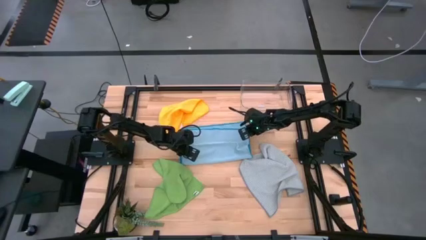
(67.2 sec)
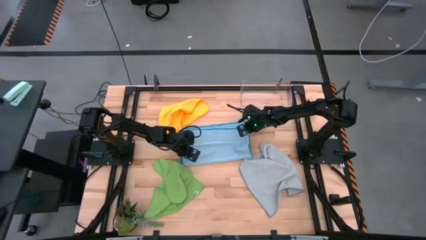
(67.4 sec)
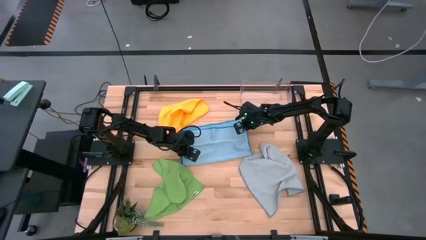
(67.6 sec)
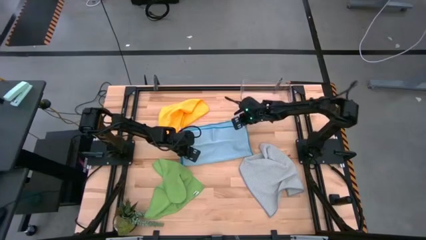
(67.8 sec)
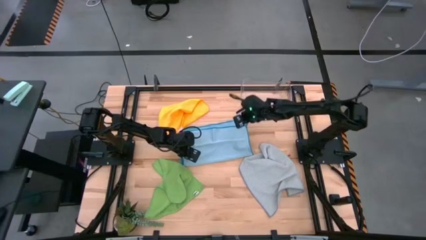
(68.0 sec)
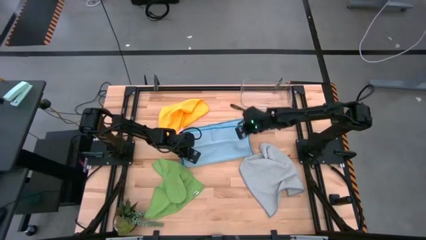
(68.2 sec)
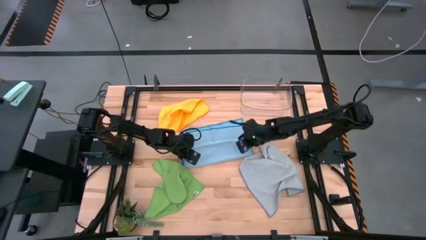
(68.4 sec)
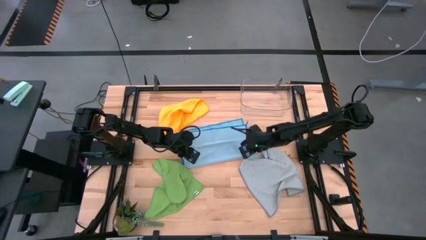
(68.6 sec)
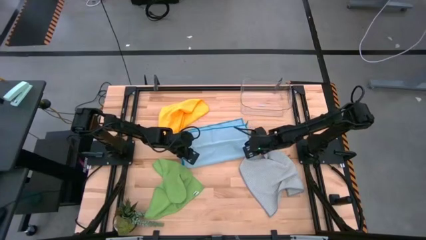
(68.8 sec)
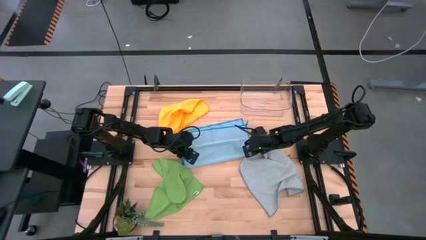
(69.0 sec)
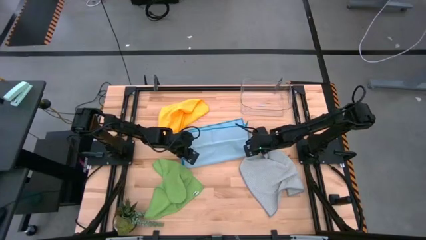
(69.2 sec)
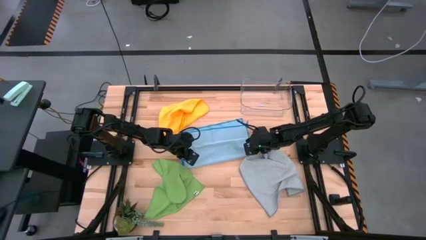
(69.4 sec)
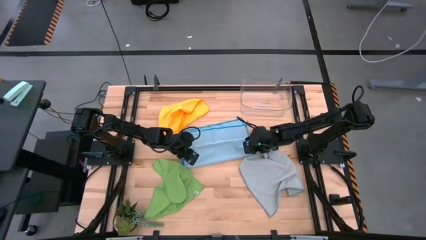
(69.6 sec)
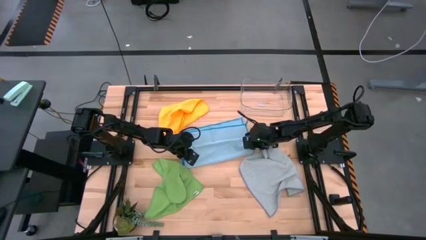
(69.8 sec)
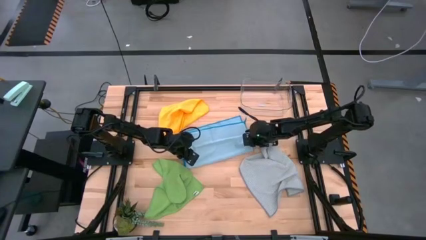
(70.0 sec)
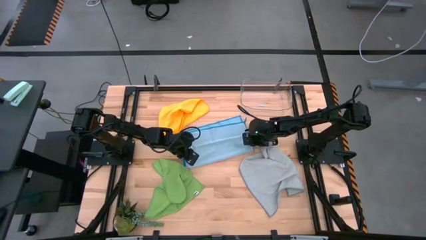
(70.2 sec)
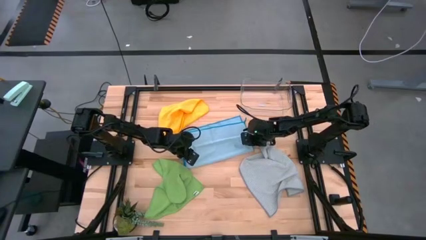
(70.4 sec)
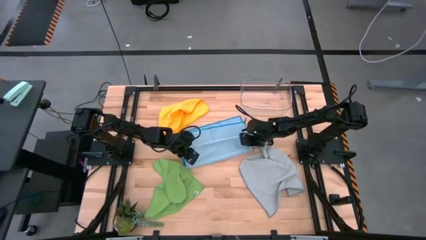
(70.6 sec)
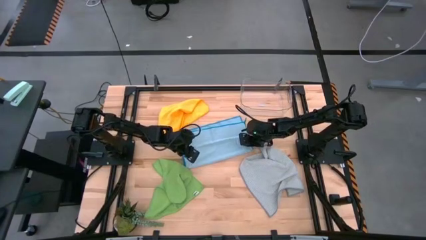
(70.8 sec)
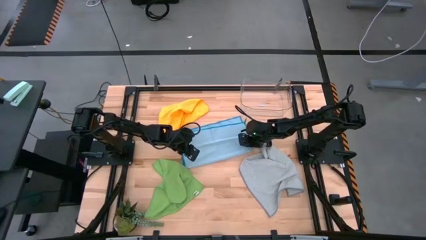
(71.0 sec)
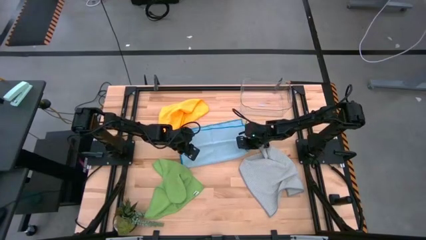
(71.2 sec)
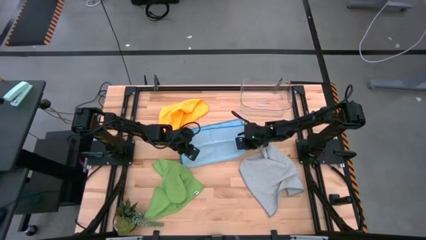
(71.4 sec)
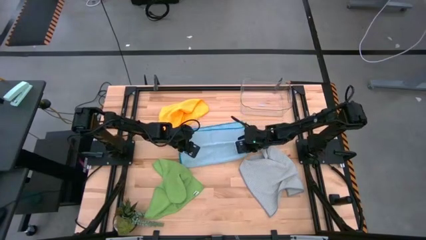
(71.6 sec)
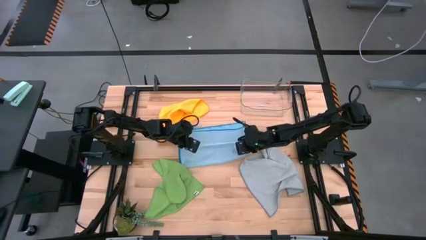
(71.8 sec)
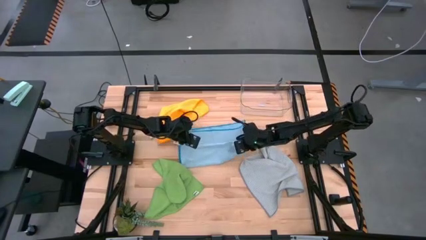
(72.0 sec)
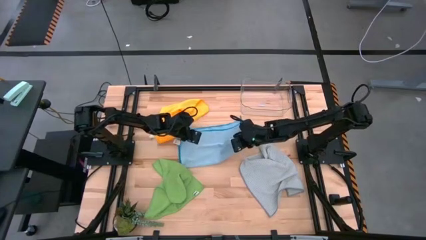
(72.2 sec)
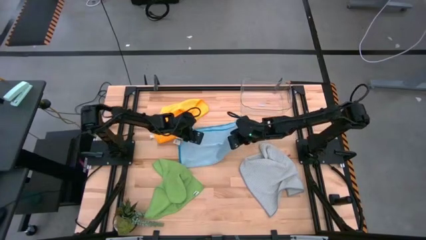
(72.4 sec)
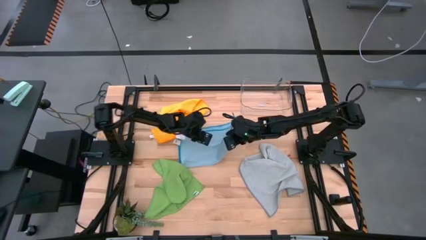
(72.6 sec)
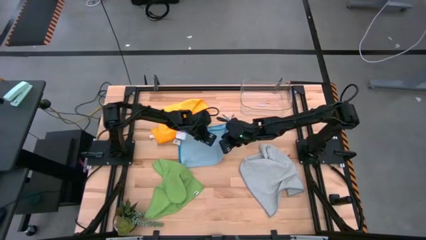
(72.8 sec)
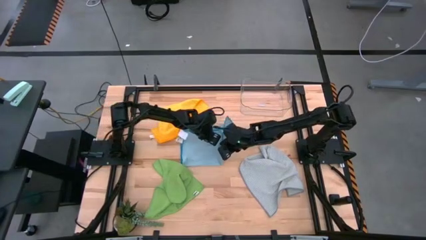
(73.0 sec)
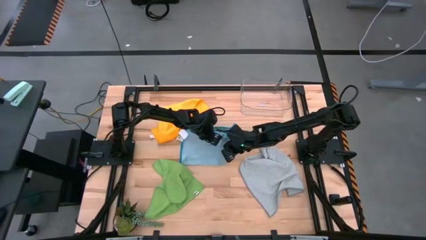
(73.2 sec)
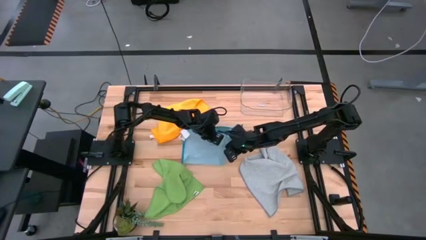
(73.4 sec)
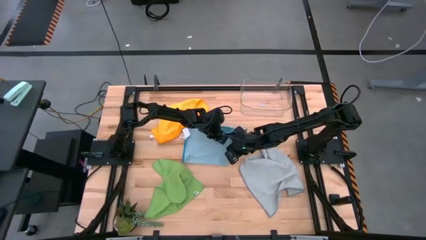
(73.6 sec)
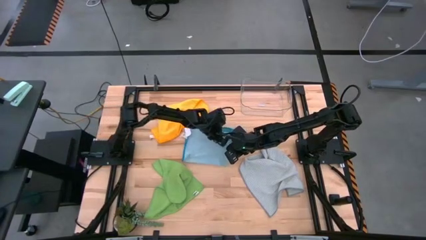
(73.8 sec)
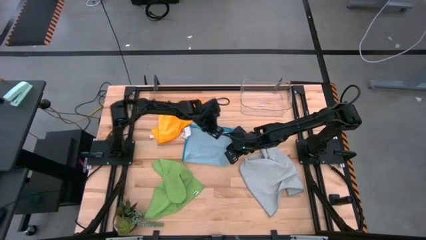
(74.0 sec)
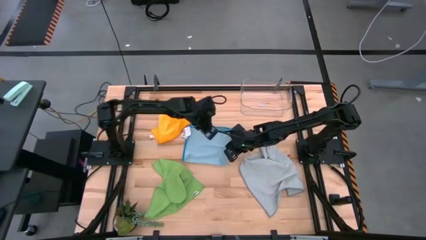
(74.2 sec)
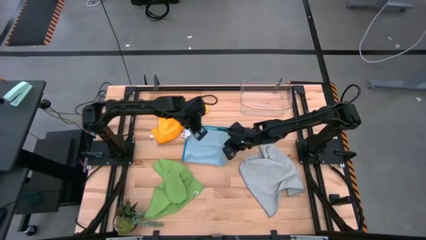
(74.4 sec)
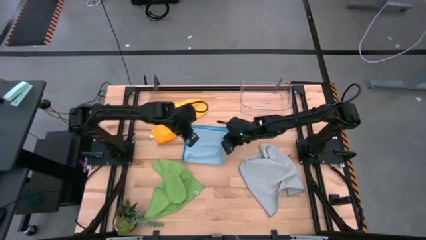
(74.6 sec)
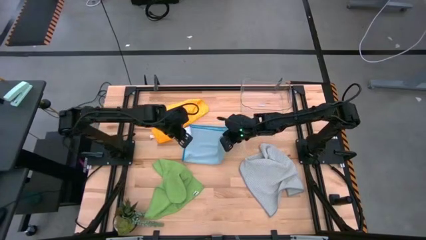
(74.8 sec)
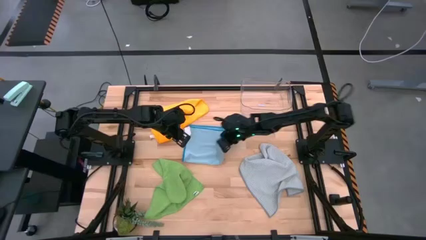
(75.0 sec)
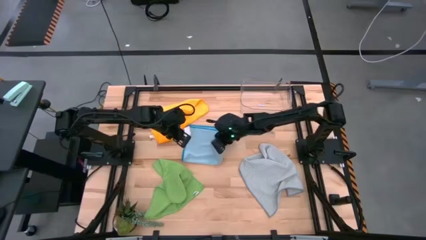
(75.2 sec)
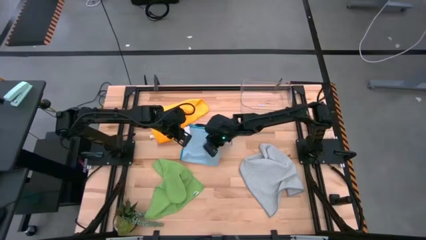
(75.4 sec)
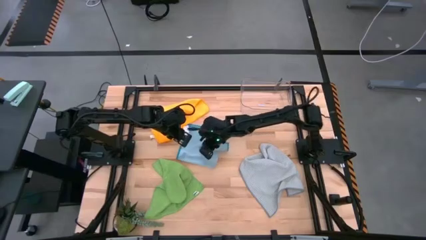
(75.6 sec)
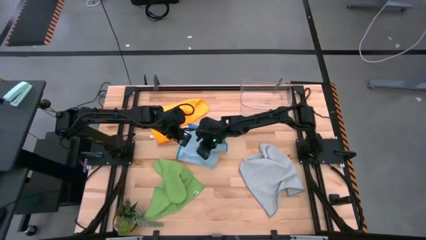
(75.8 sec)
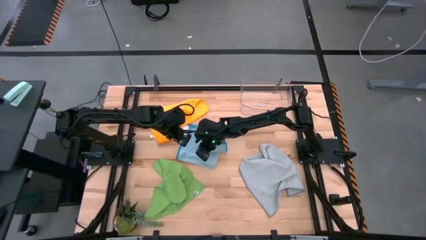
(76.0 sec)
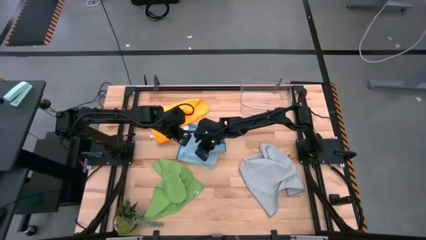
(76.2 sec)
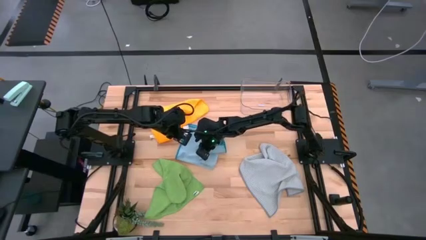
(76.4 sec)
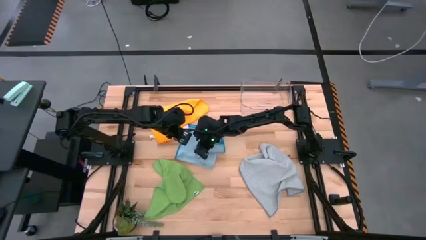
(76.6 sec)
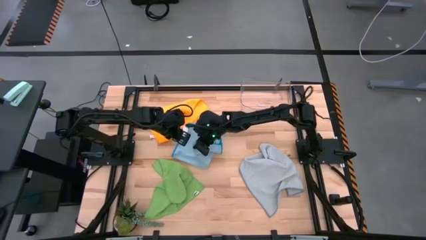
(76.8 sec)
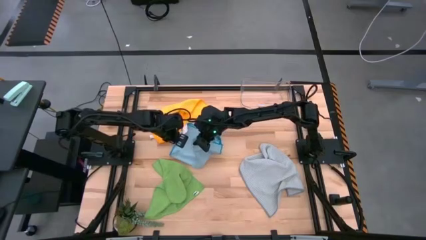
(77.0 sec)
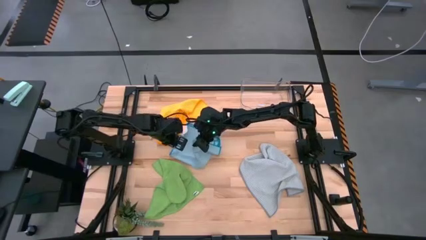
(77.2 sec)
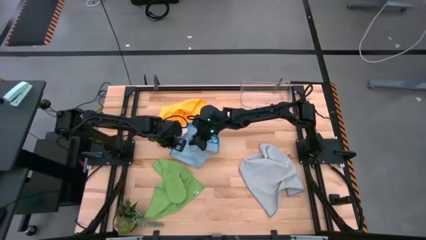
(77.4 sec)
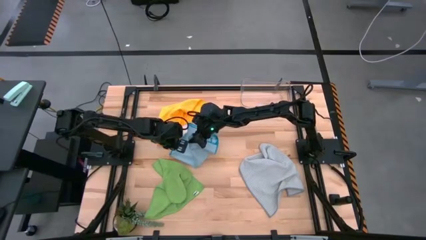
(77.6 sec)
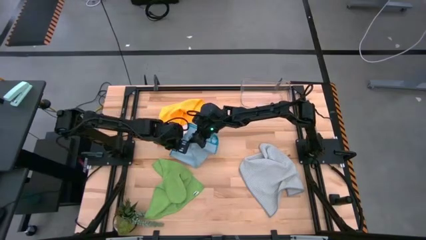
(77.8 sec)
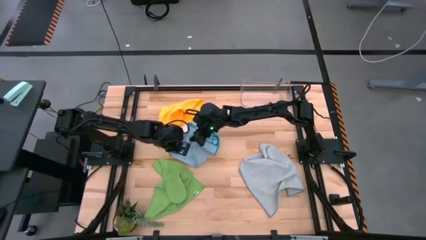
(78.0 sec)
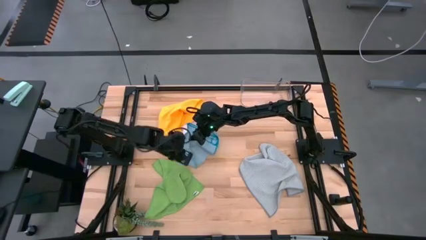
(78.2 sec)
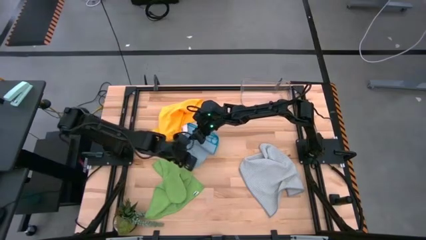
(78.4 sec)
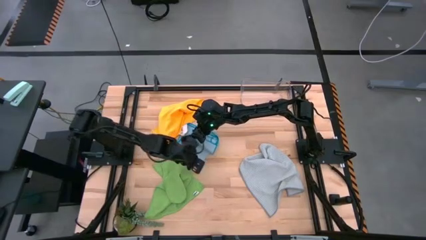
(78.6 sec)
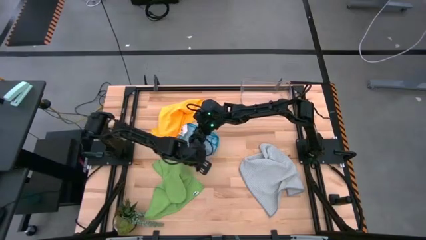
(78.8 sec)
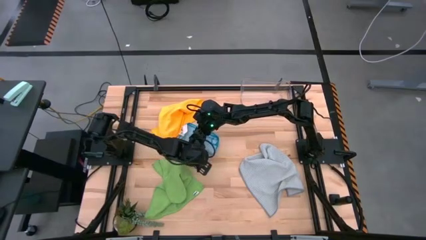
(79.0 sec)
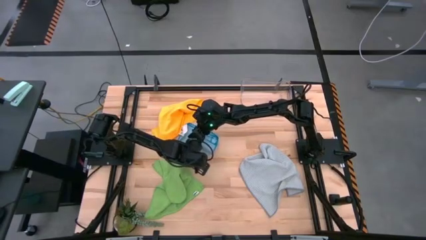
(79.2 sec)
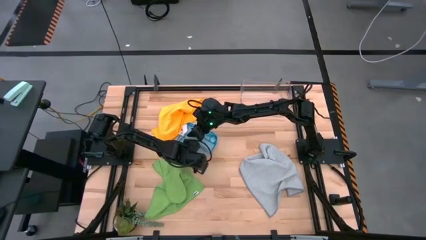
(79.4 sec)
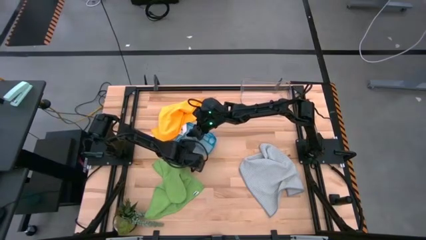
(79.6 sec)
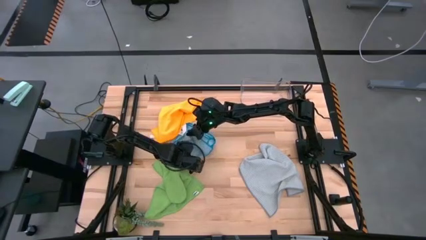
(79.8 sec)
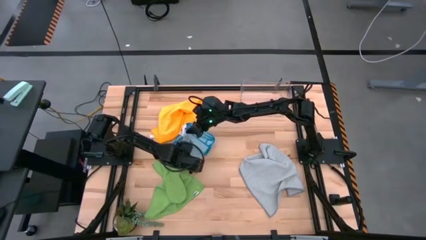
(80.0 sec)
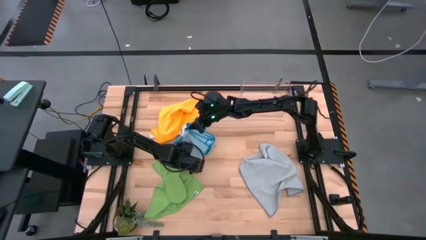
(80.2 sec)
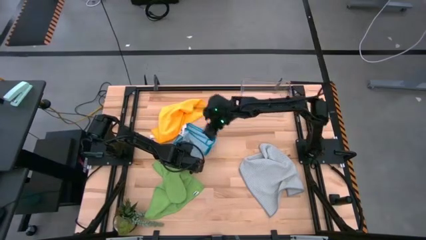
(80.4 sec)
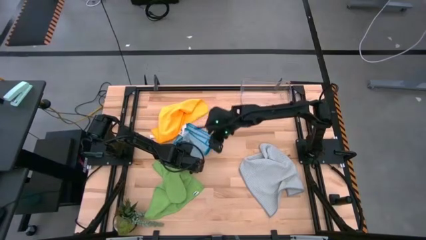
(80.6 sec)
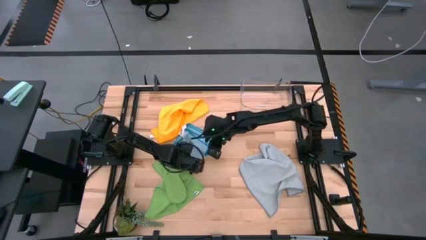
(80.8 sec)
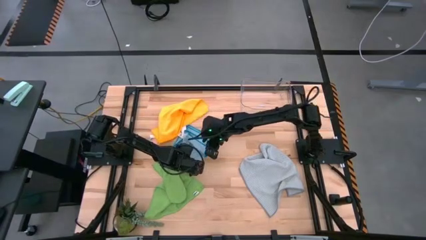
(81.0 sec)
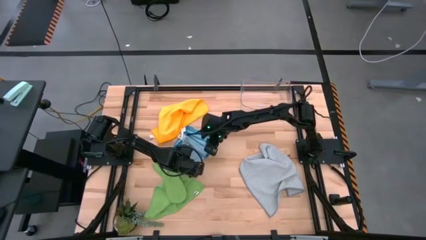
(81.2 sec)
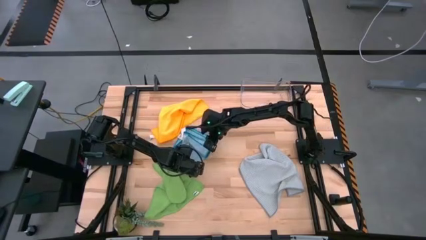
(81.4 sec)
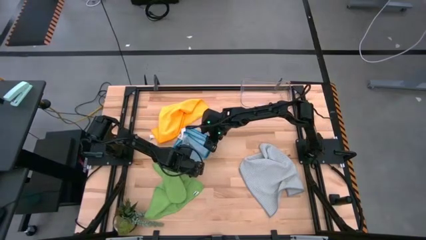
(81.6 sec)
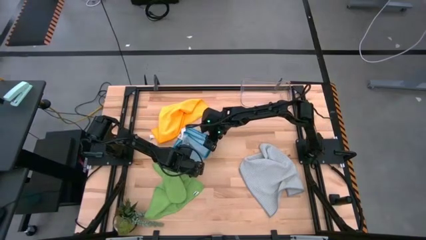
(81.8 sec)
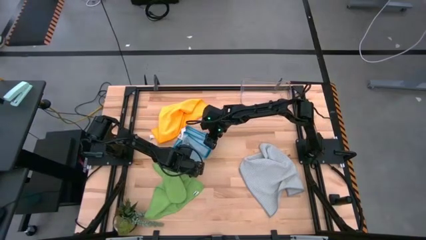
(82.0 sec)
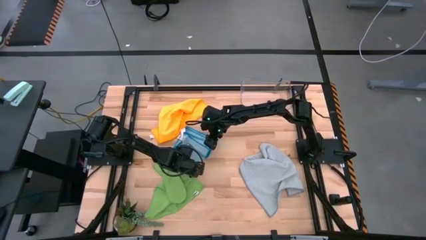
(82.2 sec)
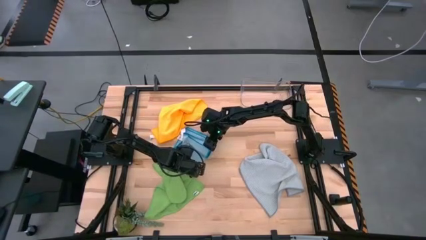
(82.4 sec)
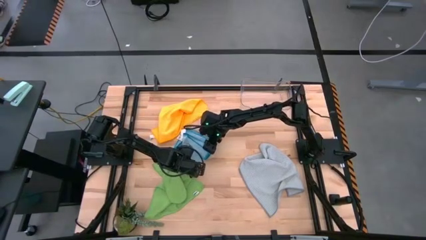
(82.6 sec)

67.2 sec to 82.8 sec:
Task: Fold microfiber towels
Fold the blue microfiber cloth
